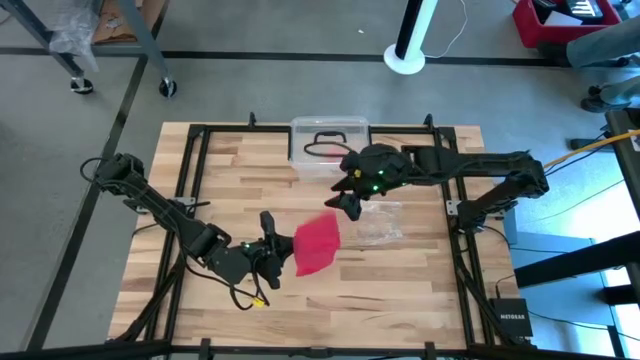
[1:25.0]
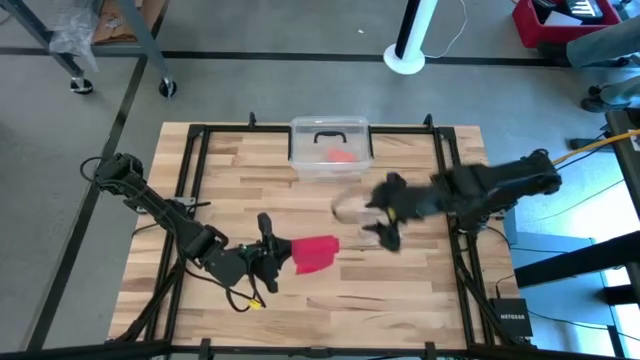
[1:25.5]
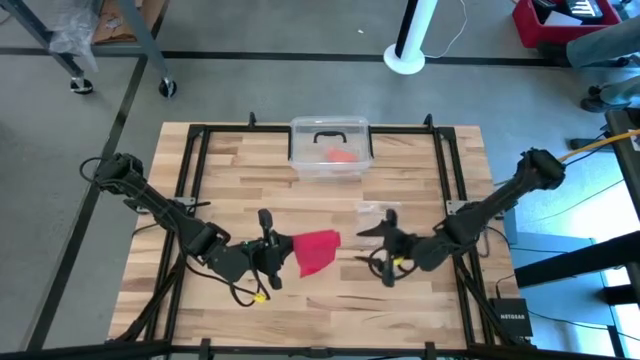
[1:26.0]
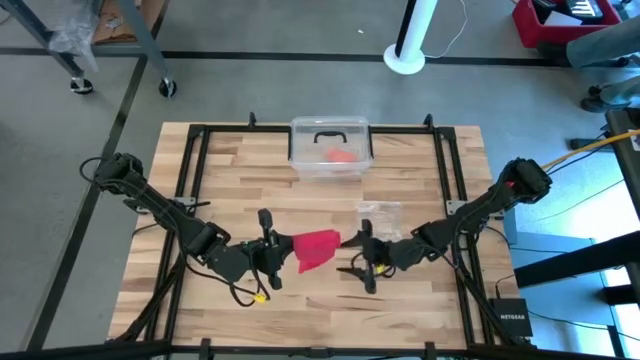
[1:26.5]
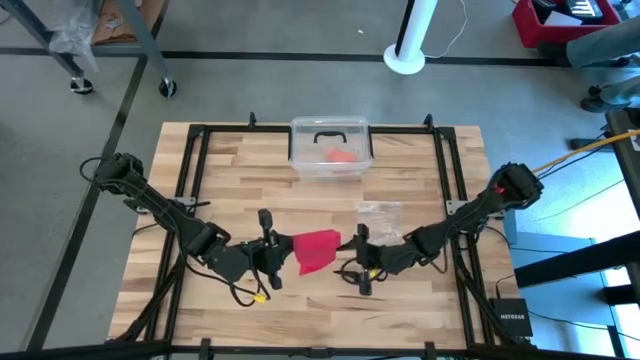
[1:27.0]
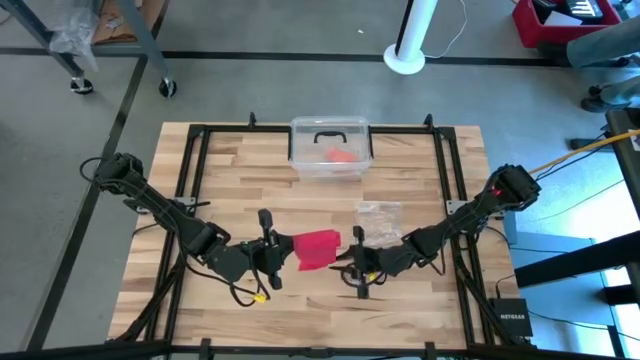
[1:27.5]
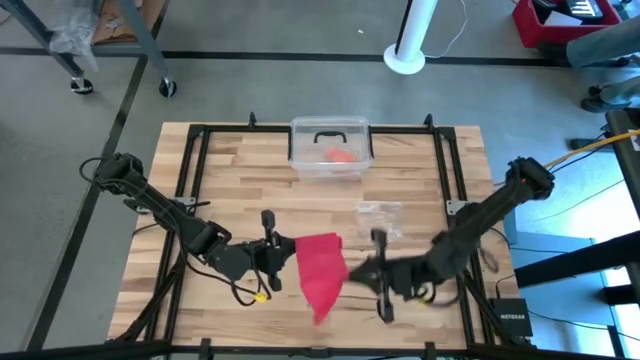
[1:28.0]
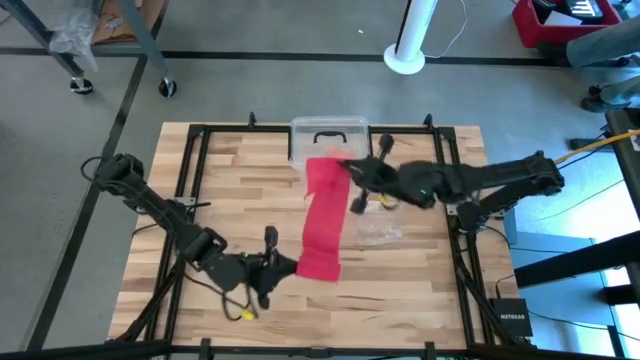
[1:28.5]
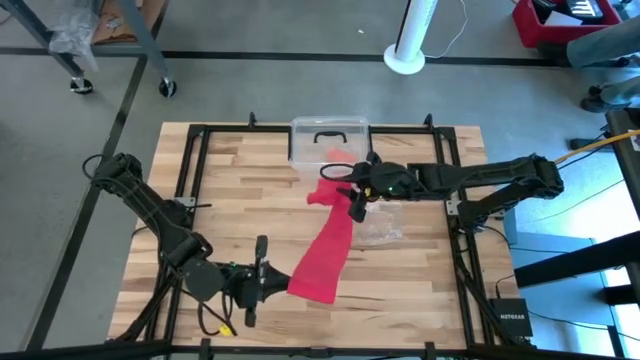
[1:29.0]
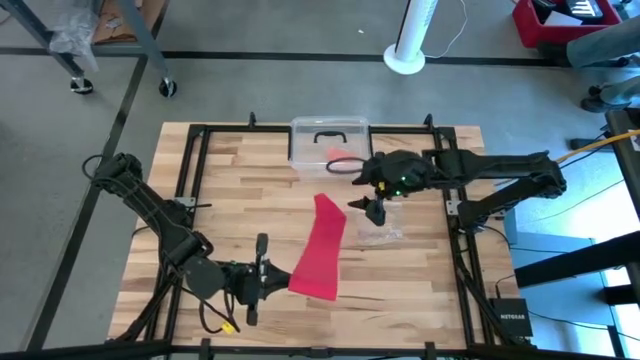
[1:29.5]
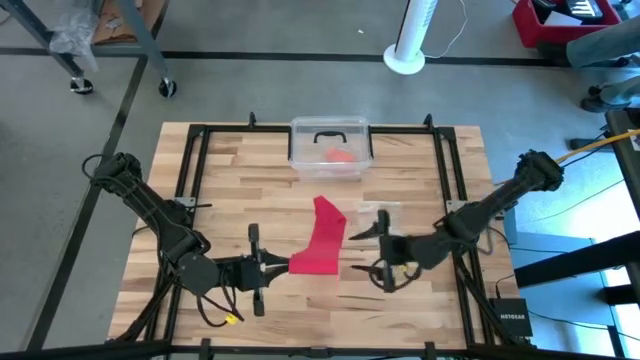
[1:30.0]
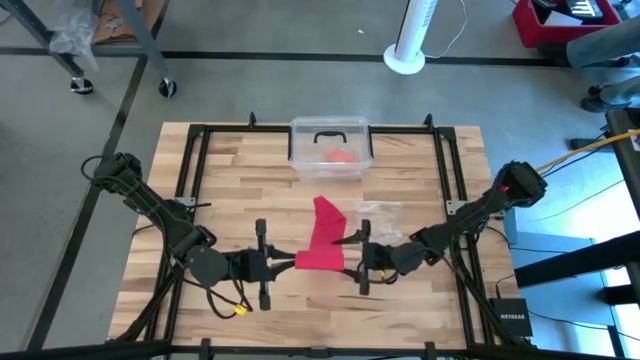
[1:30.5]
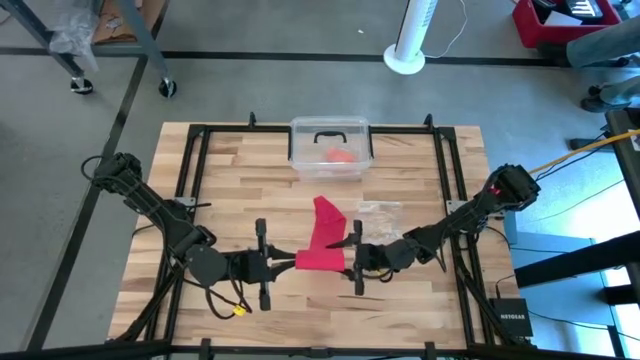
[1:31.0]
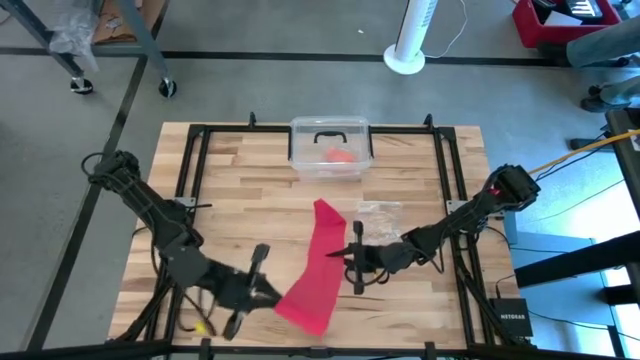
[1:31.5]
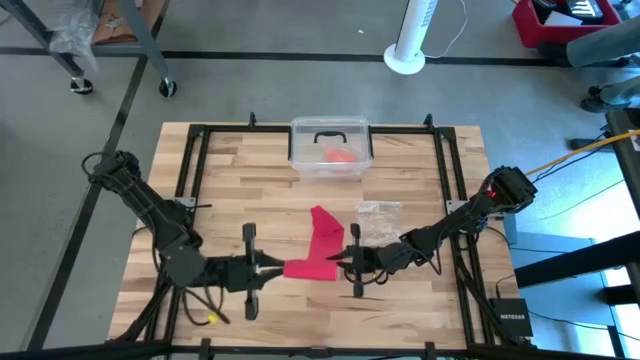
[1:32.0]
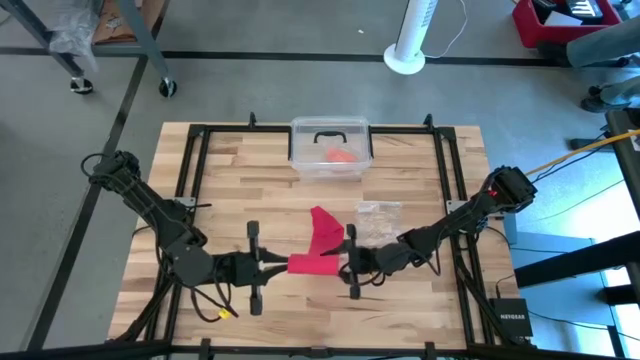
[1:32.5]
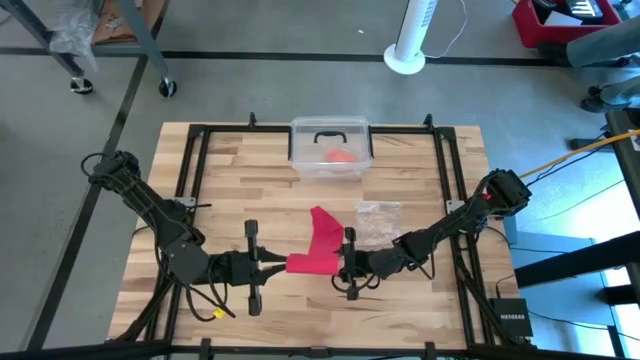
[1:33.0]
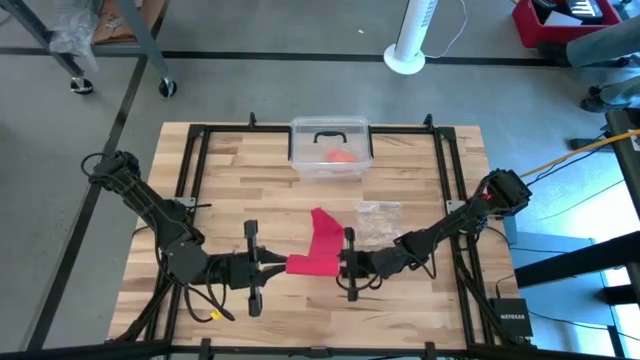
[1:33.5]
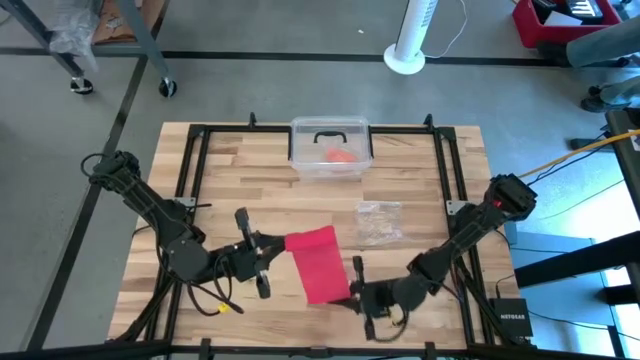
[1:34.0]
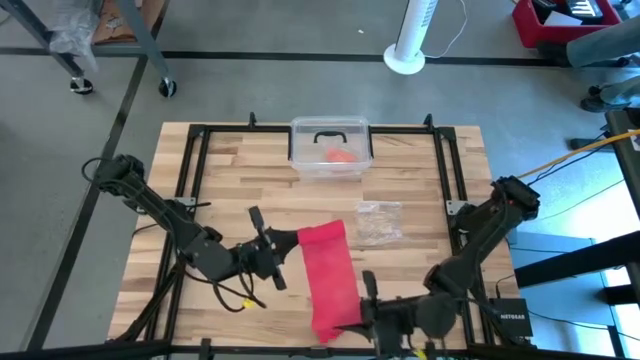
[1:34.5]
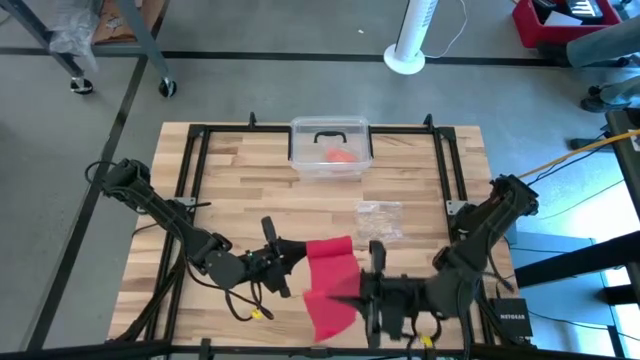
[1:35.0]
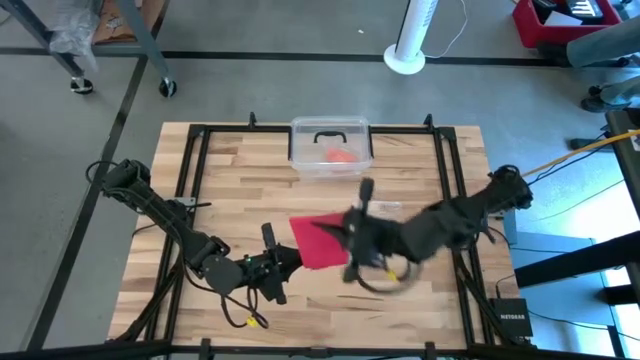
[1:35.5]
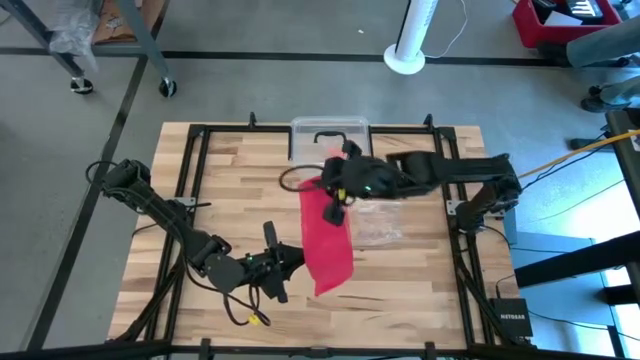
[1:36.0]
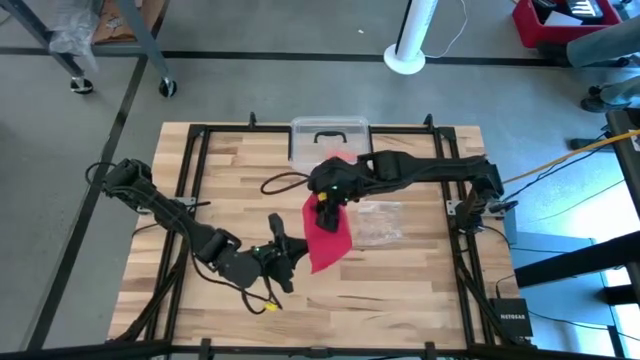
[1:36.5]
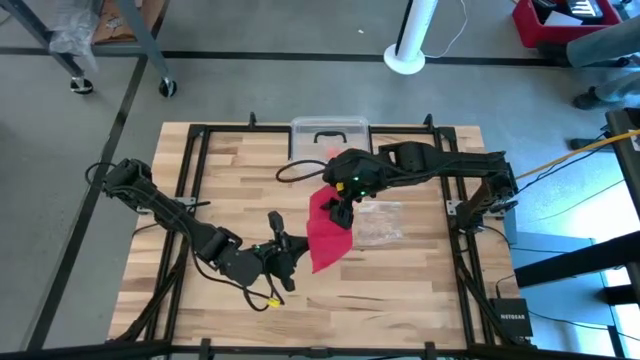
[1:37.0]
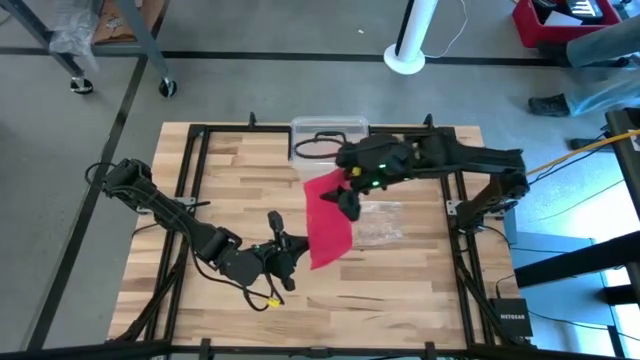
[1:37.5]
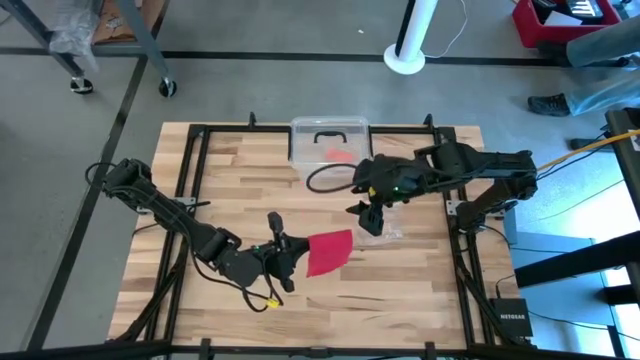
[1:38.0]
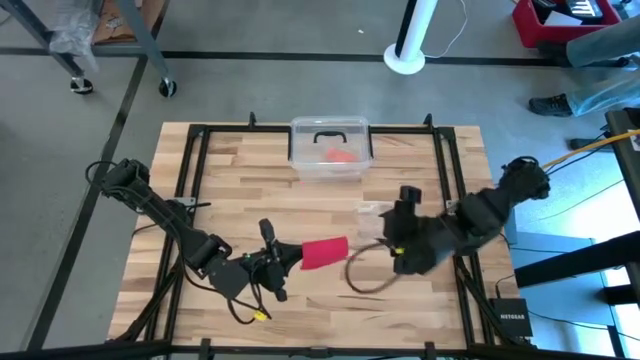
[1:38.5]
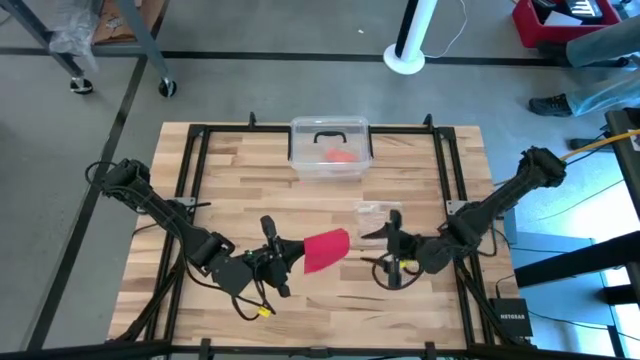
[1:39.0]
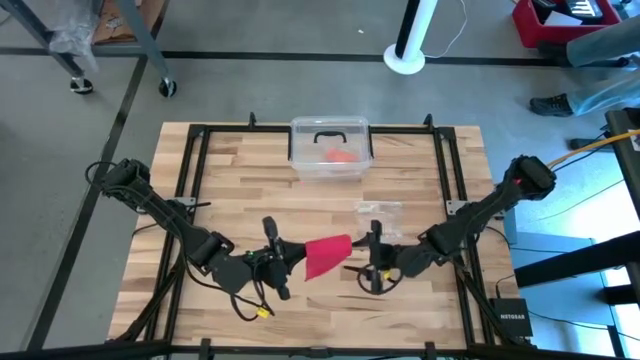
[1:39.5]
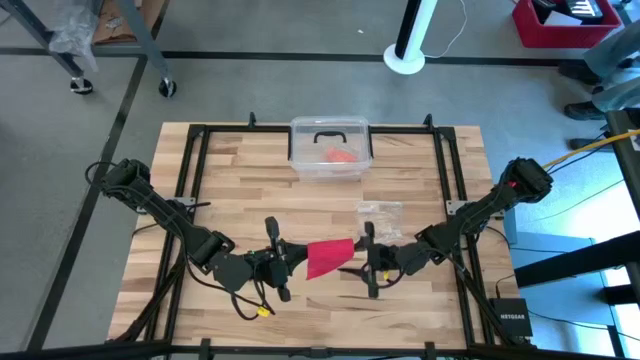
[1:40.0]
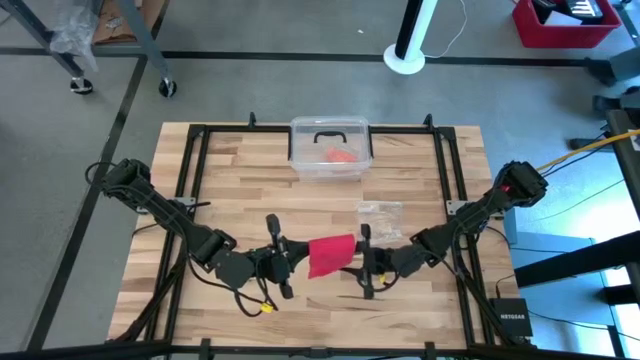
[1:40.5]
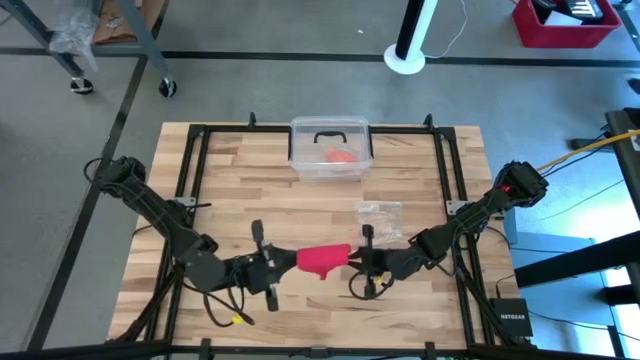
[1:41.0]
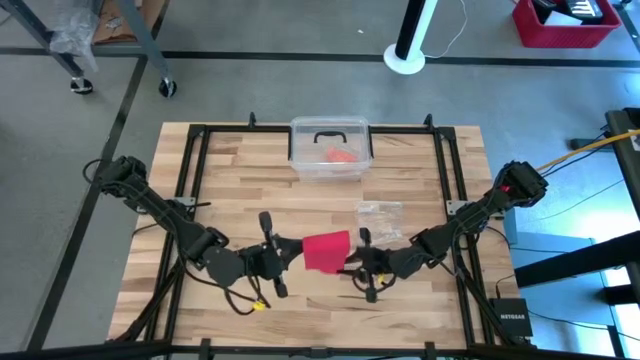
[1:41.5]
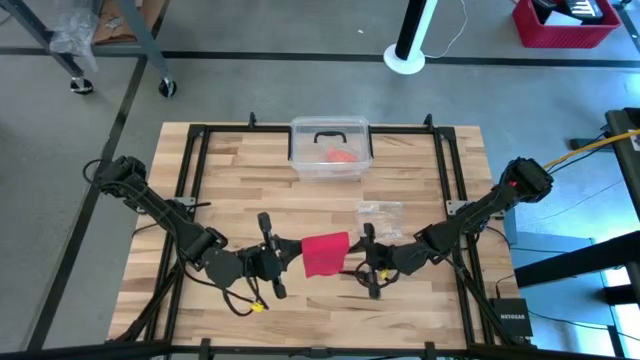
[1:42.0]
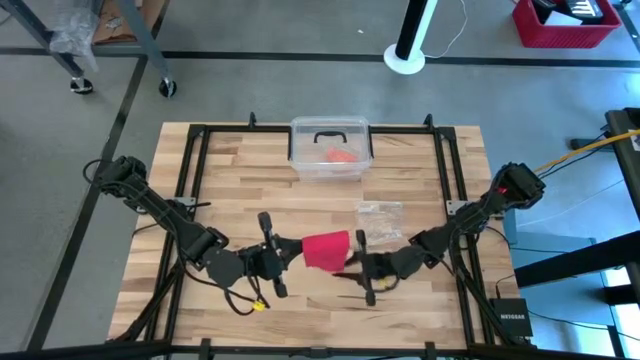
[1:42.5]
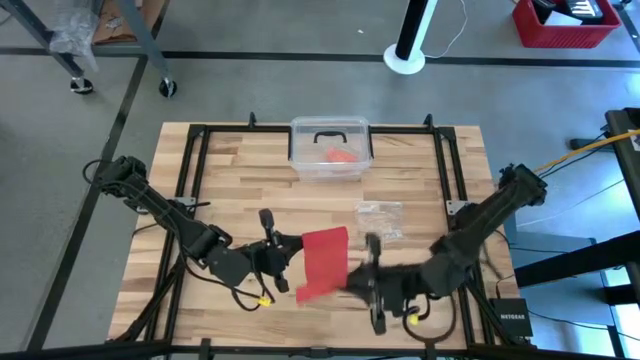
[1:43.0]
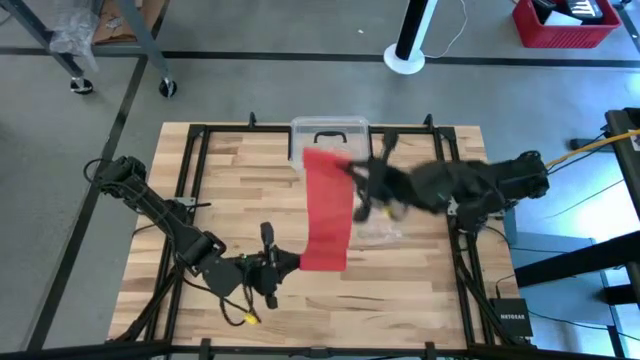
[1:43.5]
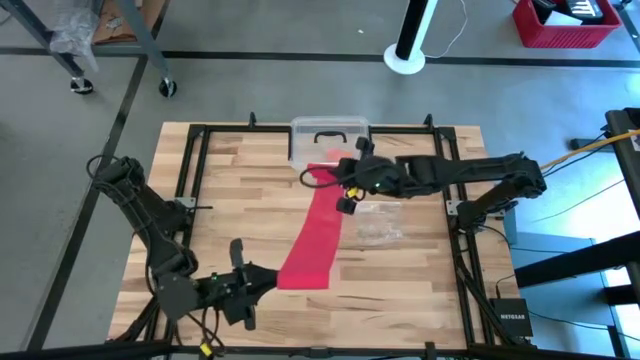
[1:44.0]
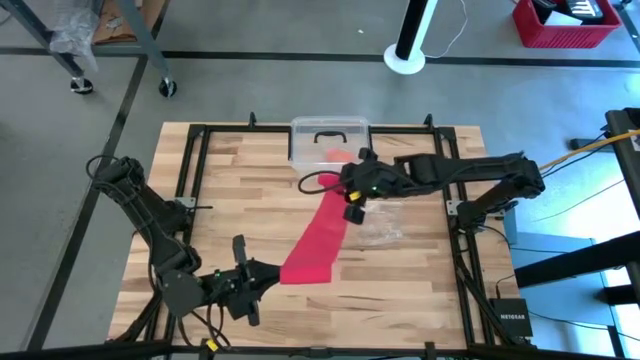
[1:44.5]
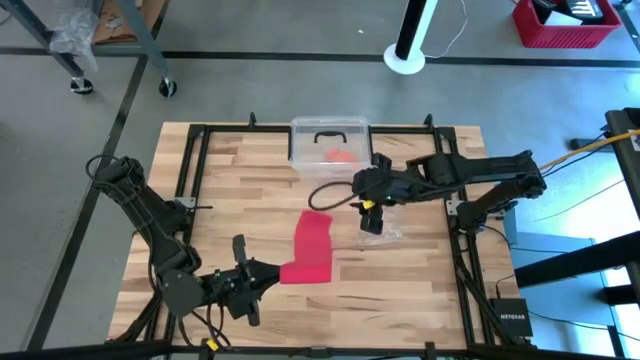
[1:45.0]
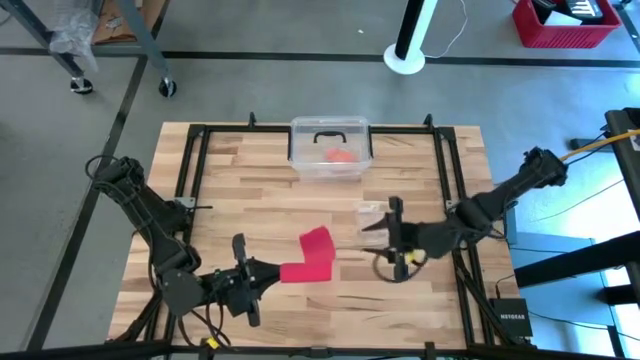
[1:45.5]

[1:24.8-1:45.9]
Task: Roll bandage
Roll the red bandage
